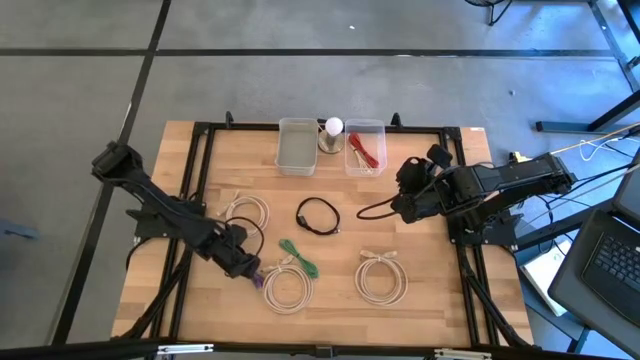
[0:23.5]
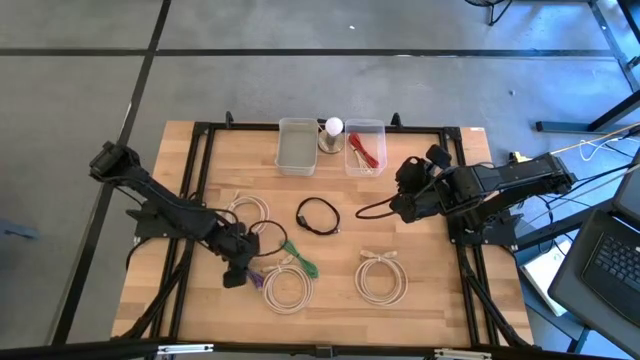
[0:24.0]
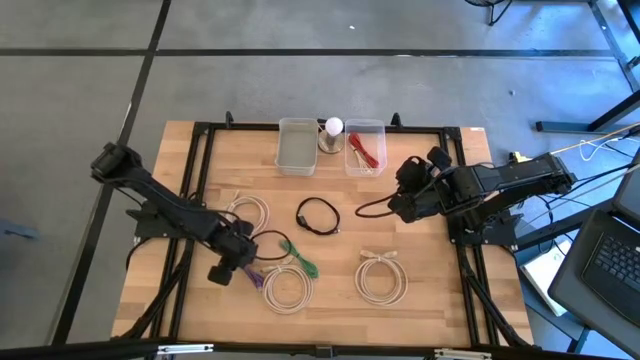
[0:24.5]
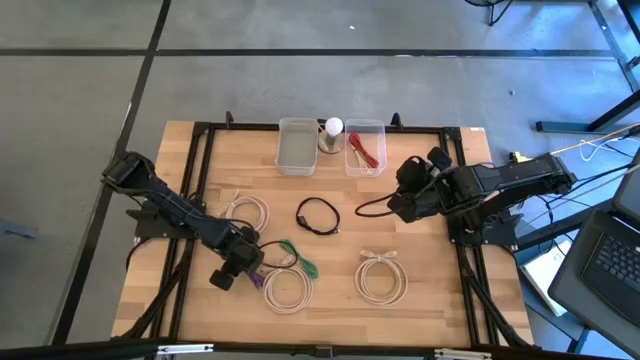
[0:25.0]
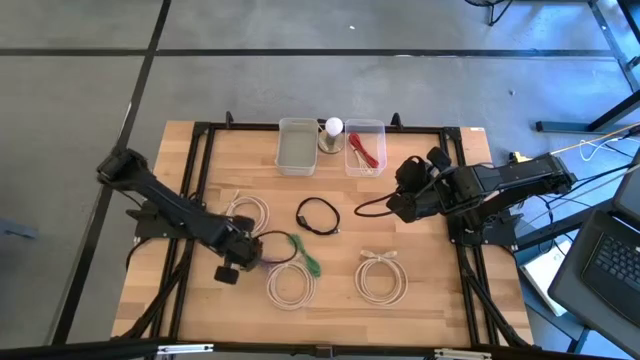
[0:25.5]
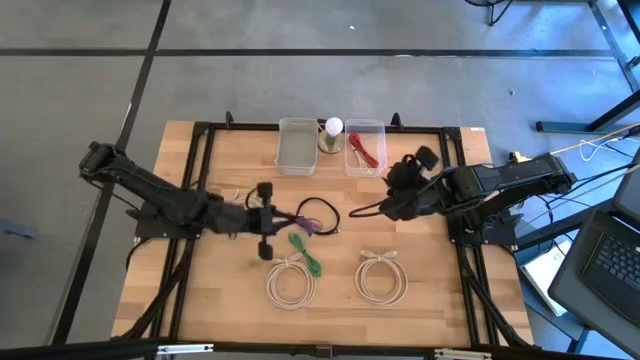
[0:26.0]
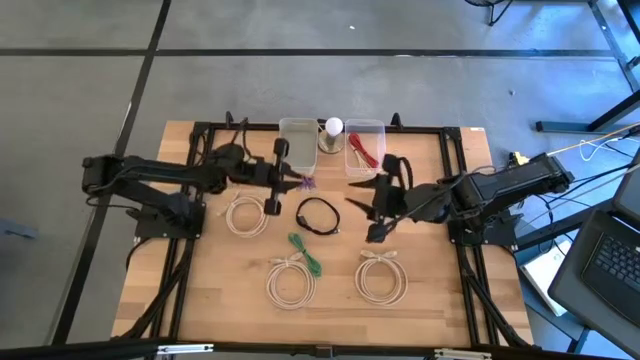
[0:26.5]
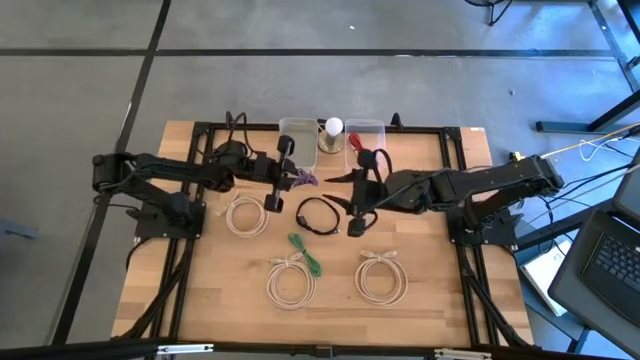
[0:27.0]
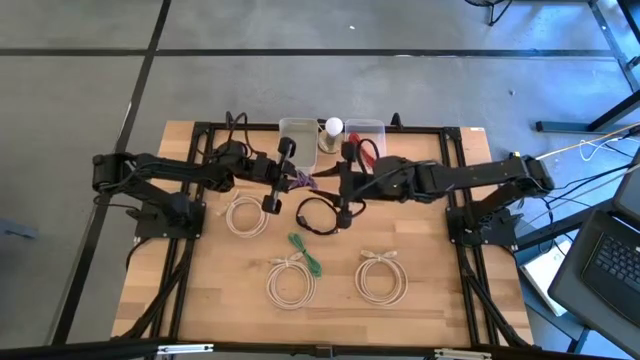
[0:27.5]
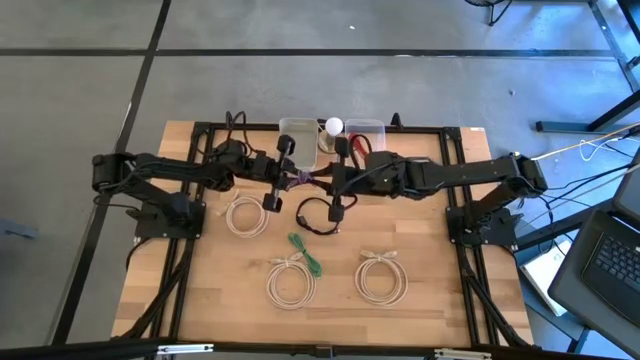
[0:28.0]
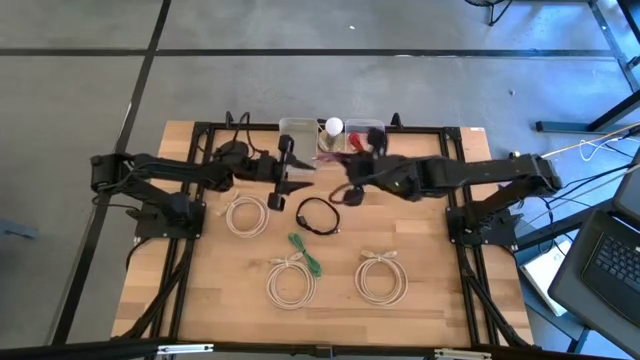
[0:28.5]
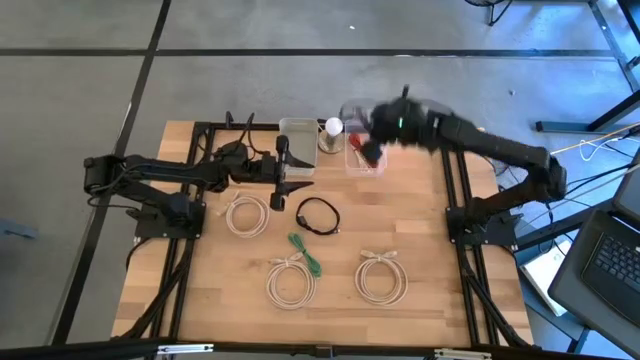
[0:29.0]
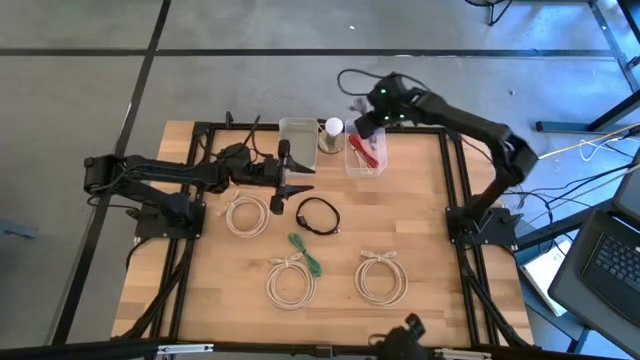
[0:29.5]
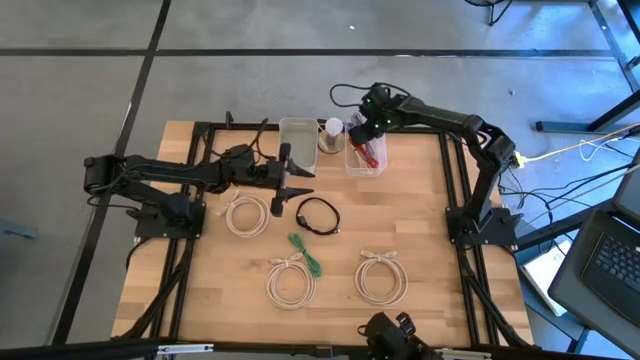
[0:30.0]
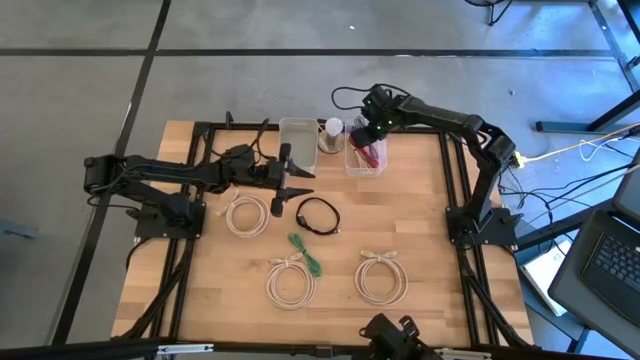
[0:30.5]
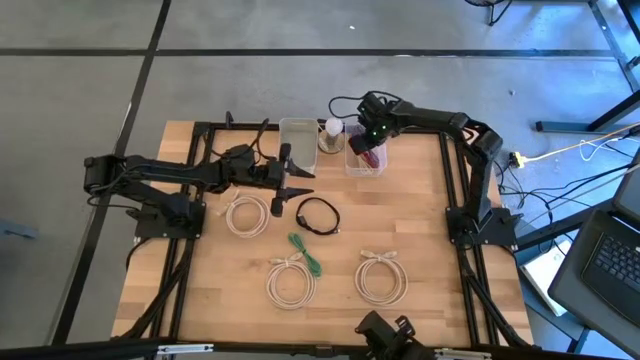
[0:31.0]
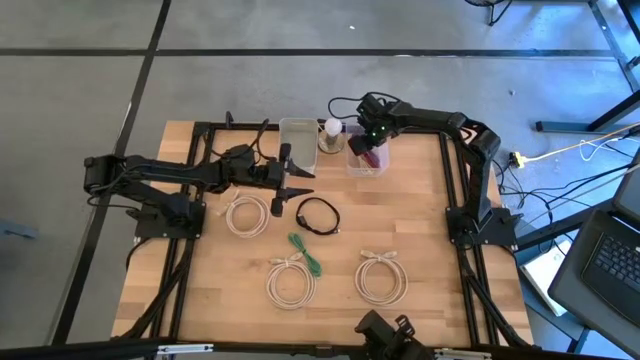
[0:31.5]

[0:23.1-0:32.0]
Put the violet charger cable into the transparent bin

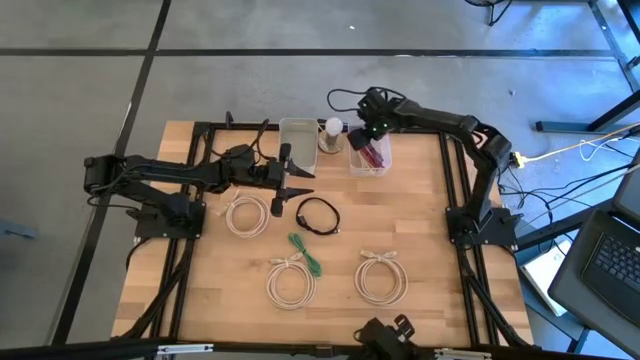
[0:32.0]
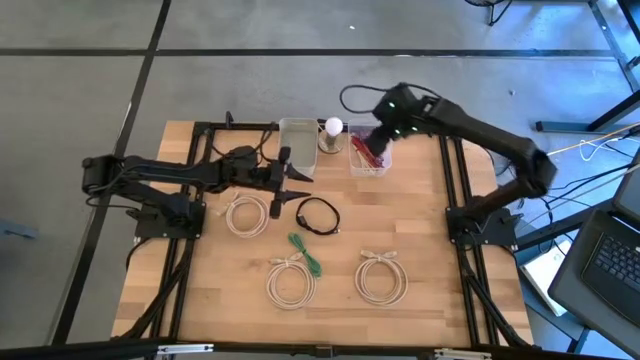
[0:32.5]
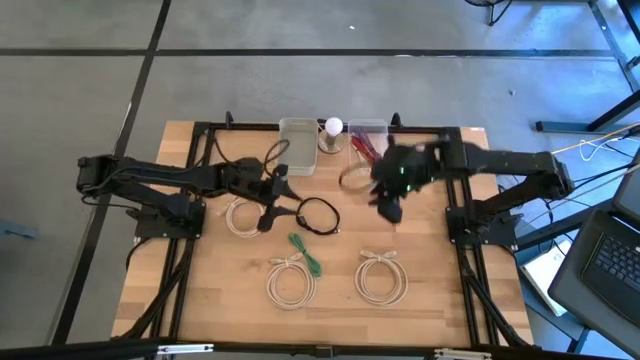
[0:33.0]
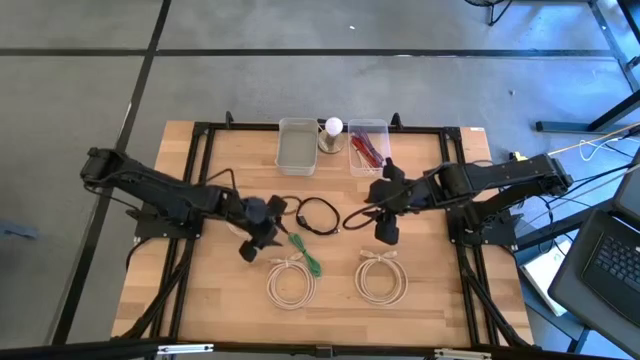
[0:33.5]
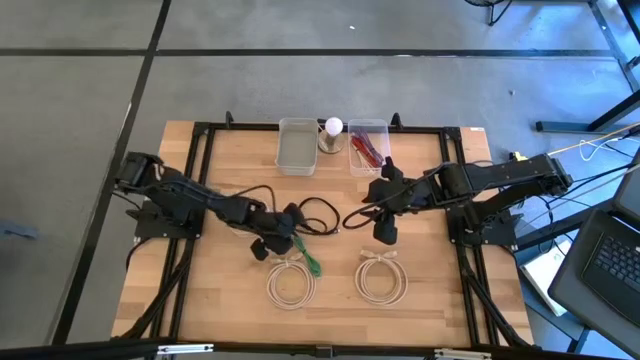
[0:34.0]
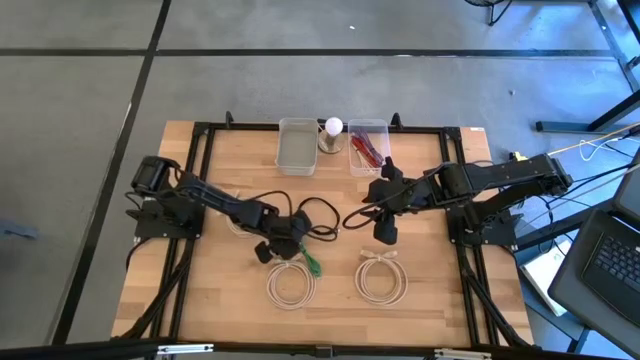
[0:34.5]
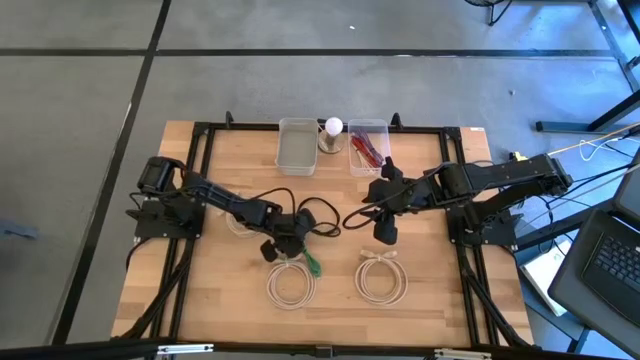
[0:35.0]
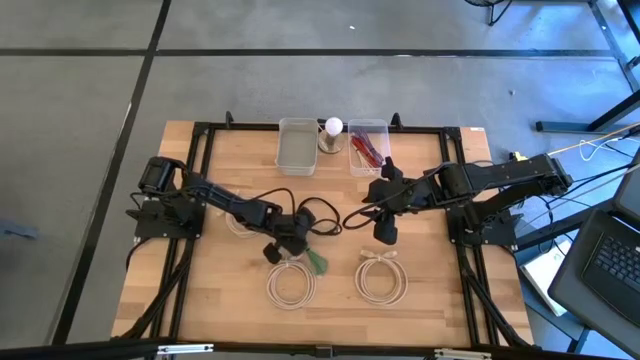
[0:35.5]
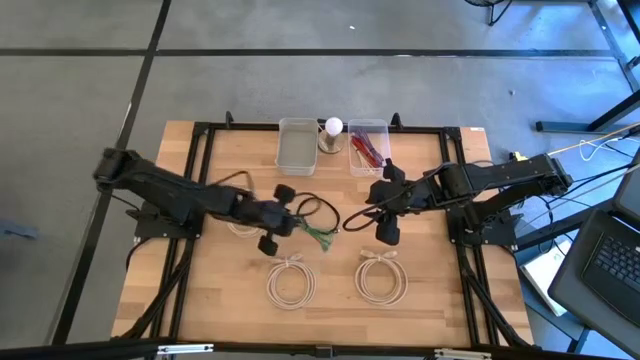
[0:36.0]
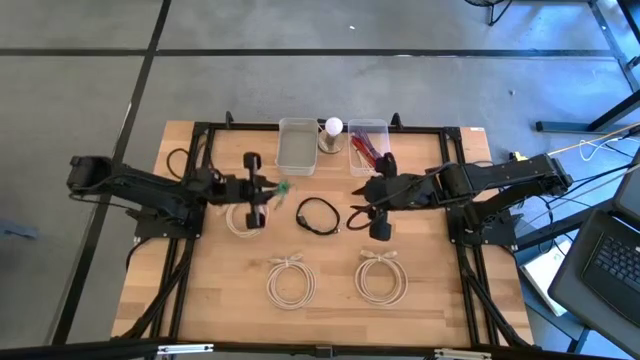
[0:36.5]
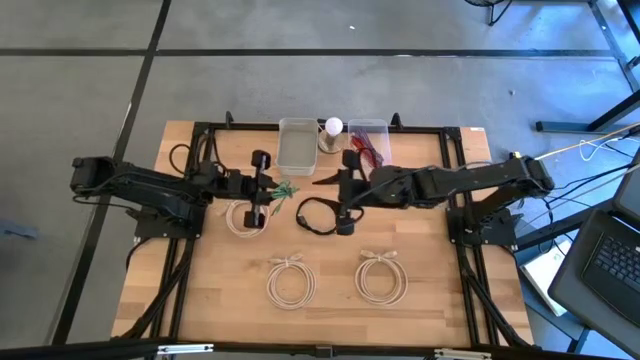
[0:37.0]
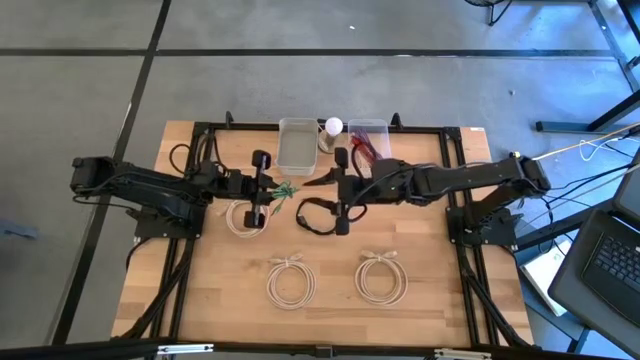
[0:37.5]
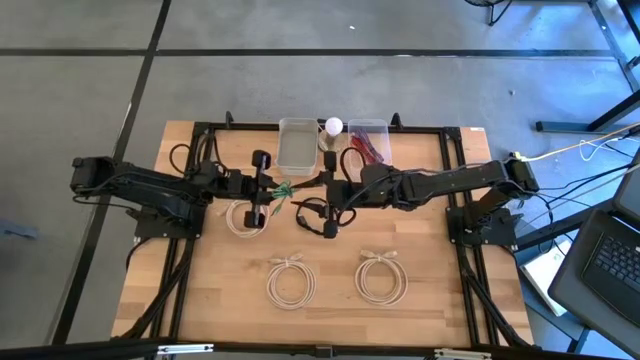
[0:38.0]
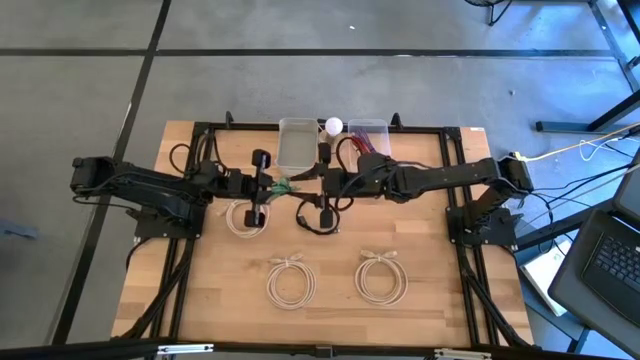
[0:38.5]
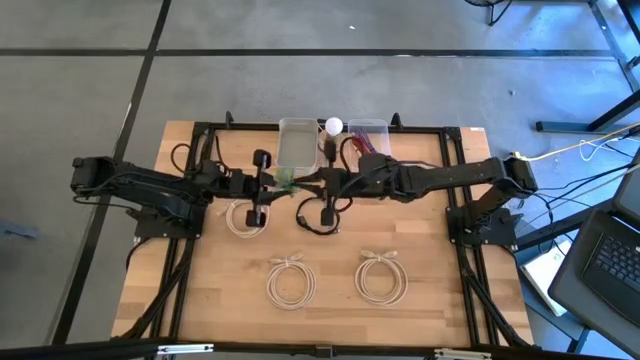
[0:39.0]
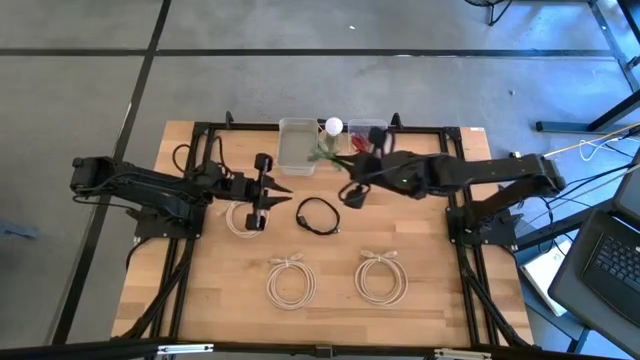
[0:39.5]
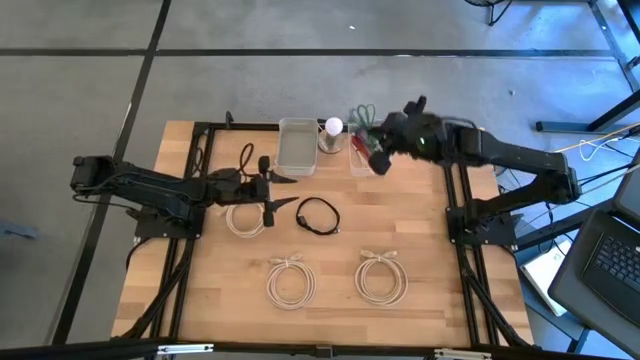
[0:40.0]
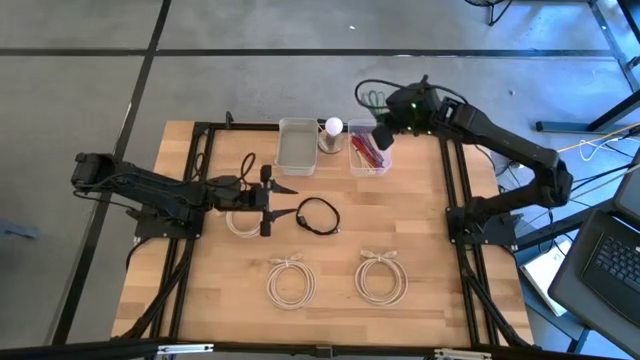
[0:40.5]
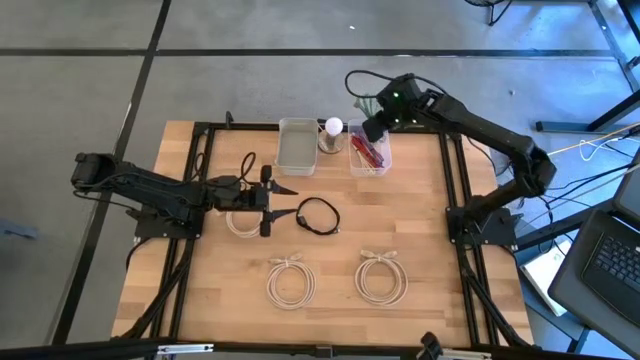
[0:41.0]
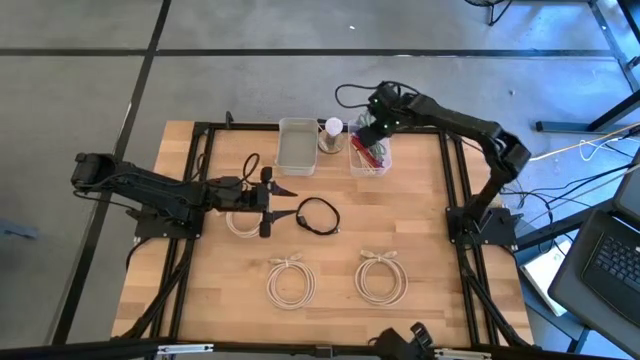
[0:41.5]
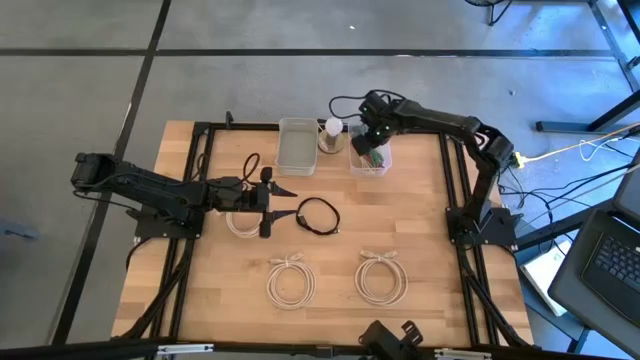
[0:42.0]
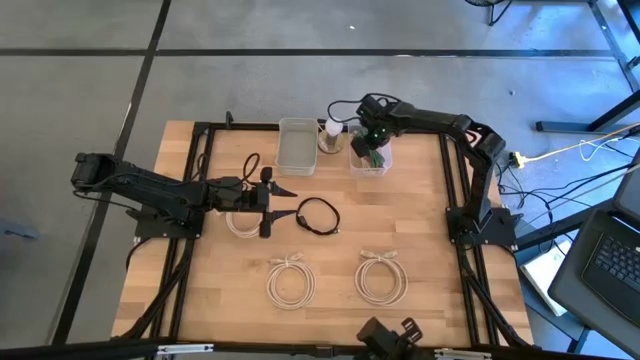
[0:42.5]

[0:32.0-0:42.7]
Put the green charger cable into the transparent bin

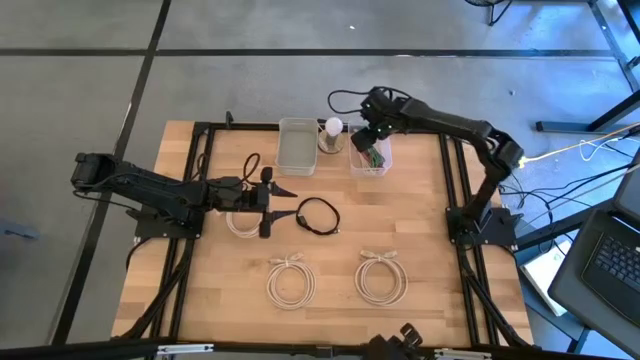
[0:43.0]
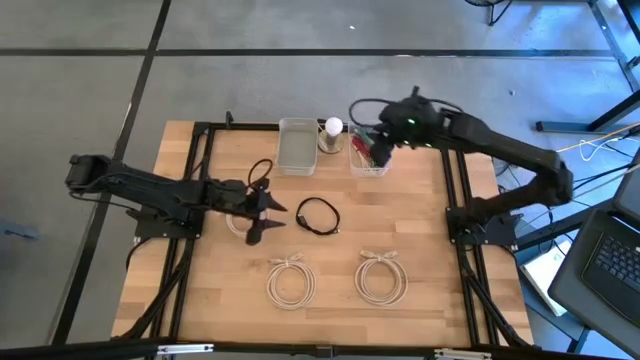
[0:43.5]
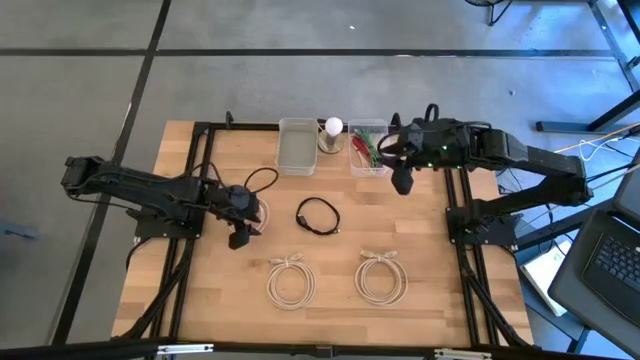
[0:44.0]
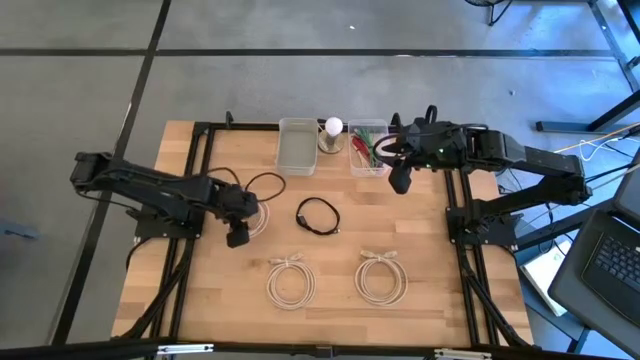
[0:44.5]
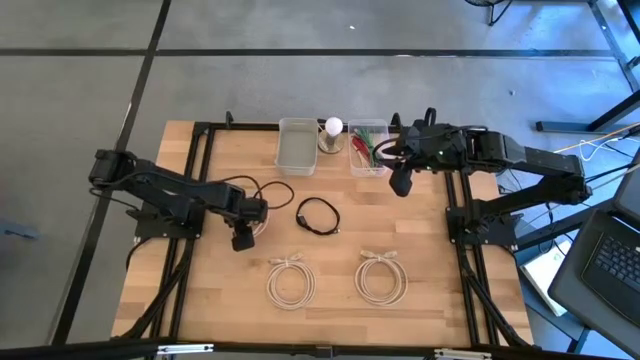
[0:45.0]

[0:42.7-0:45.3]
Put the top light brown HDMI cable into the gray bin
